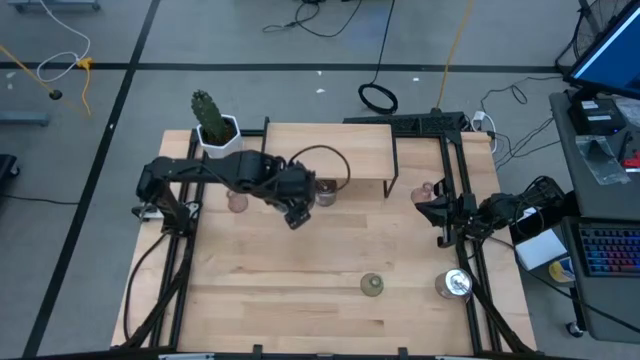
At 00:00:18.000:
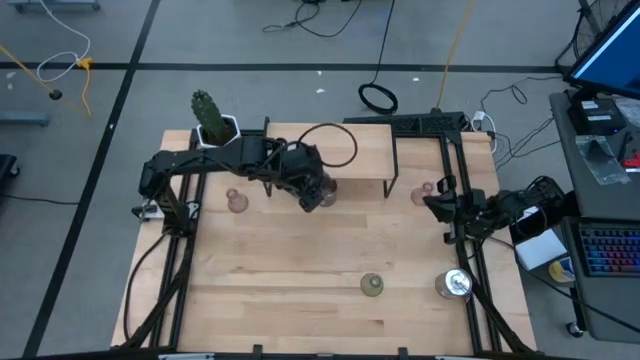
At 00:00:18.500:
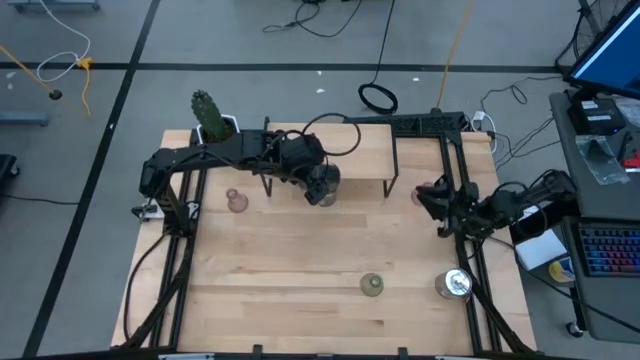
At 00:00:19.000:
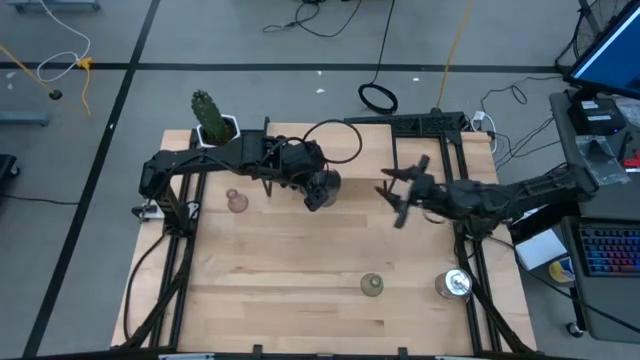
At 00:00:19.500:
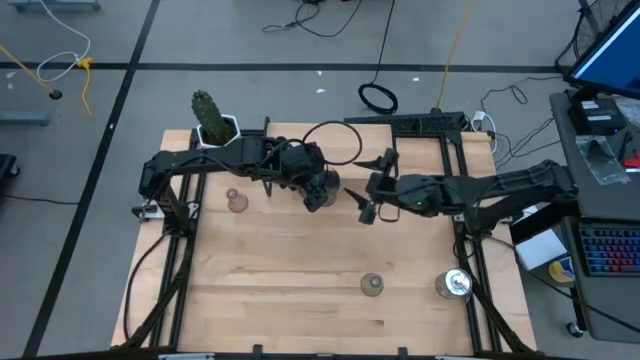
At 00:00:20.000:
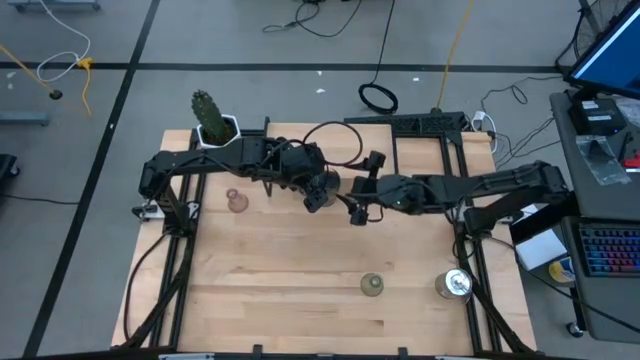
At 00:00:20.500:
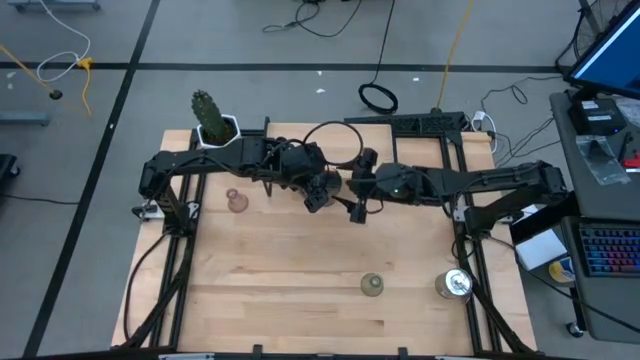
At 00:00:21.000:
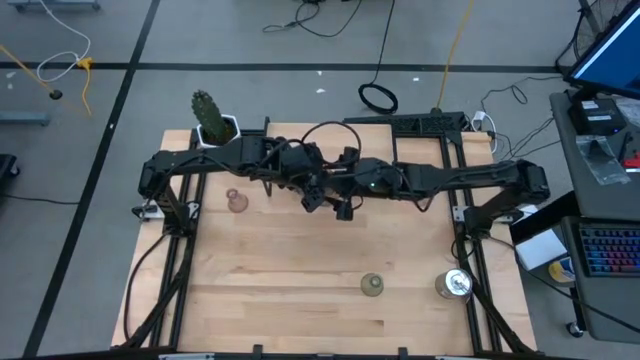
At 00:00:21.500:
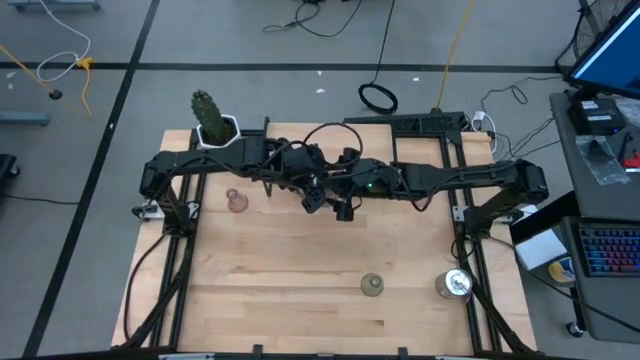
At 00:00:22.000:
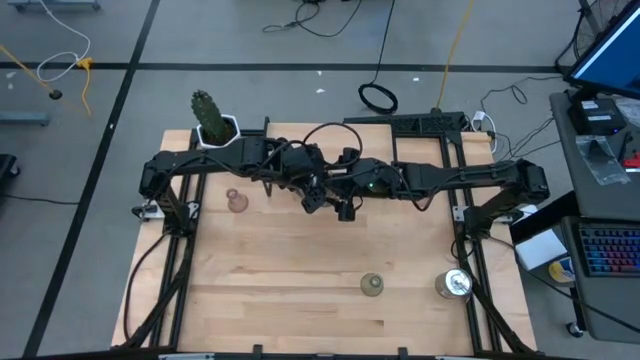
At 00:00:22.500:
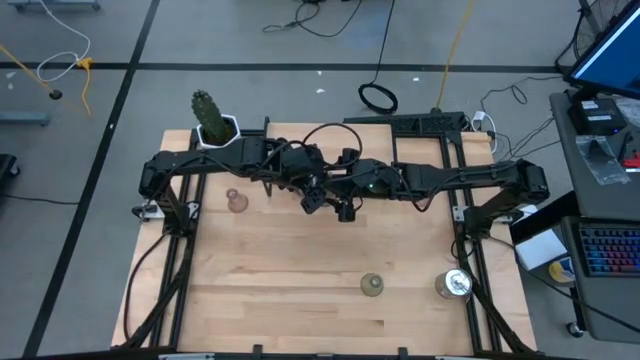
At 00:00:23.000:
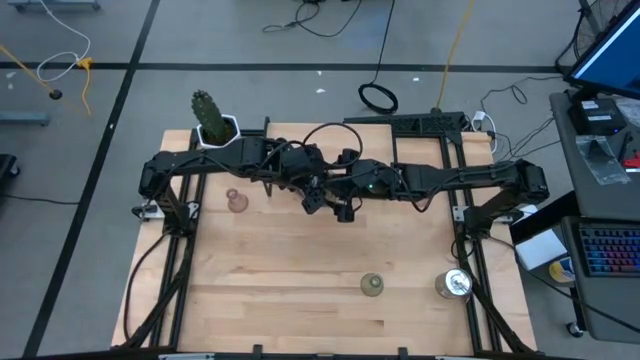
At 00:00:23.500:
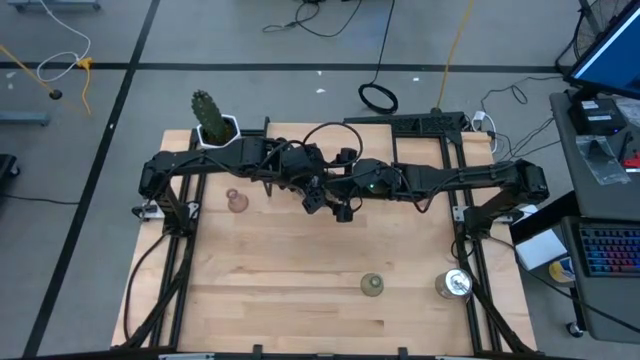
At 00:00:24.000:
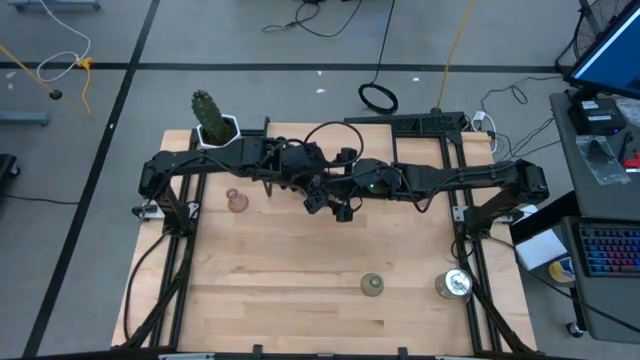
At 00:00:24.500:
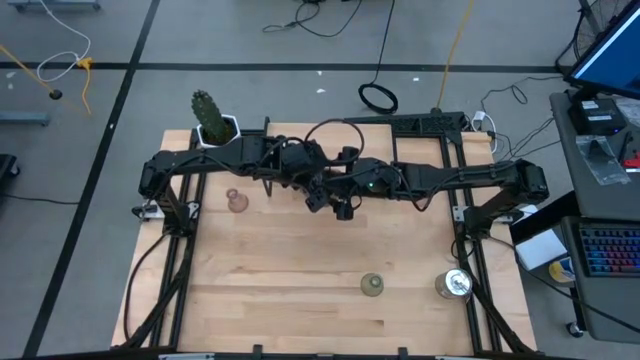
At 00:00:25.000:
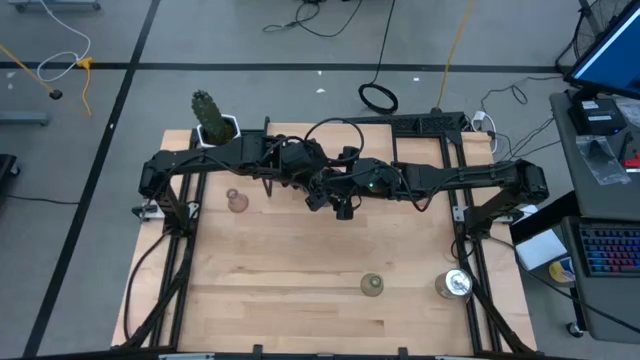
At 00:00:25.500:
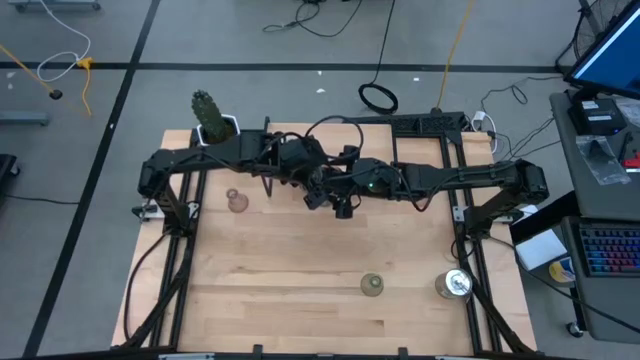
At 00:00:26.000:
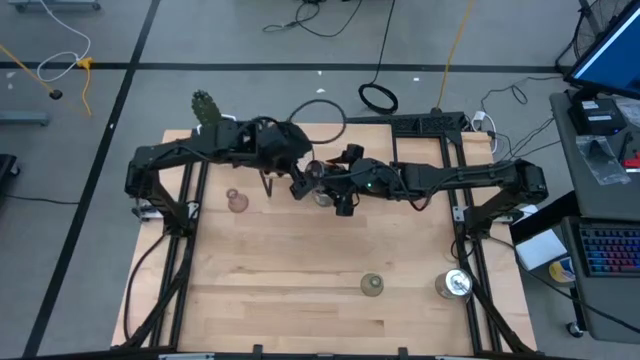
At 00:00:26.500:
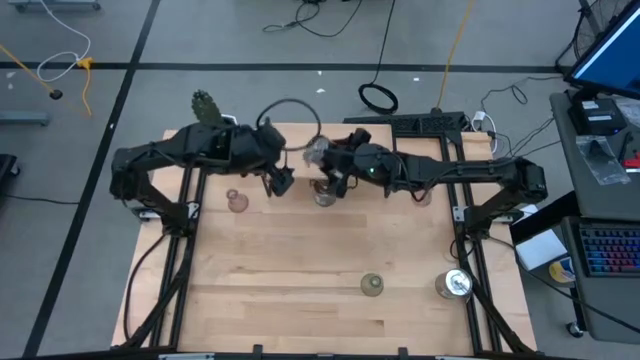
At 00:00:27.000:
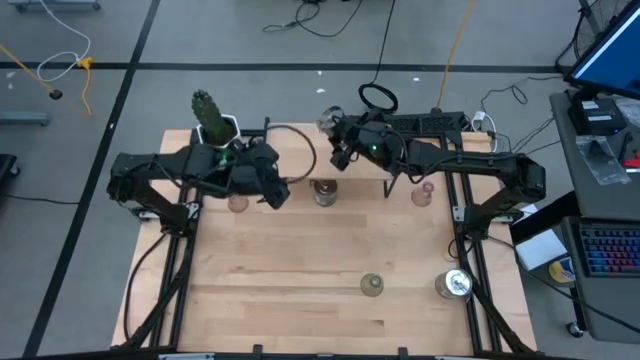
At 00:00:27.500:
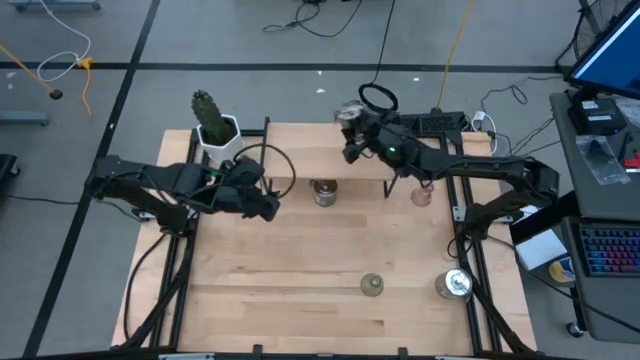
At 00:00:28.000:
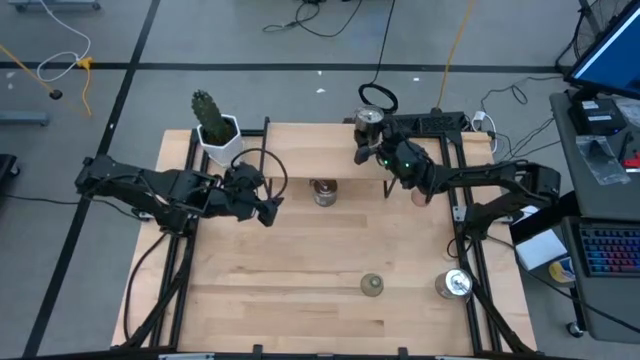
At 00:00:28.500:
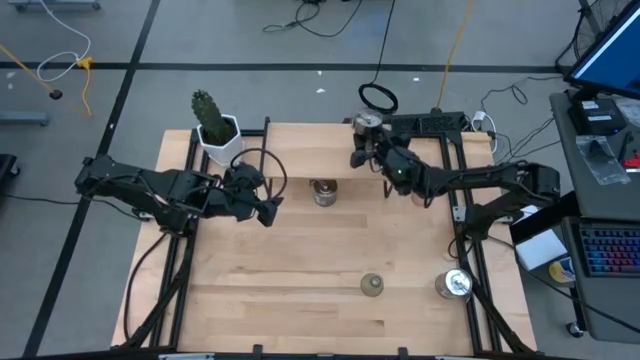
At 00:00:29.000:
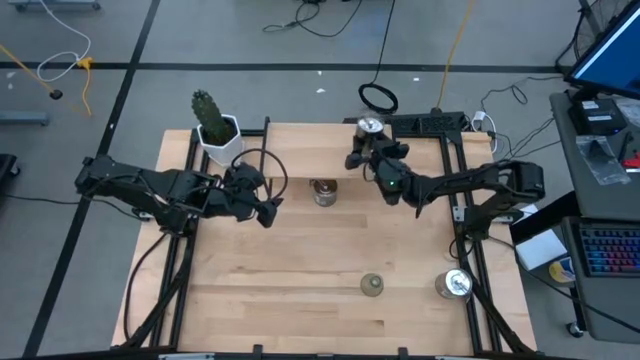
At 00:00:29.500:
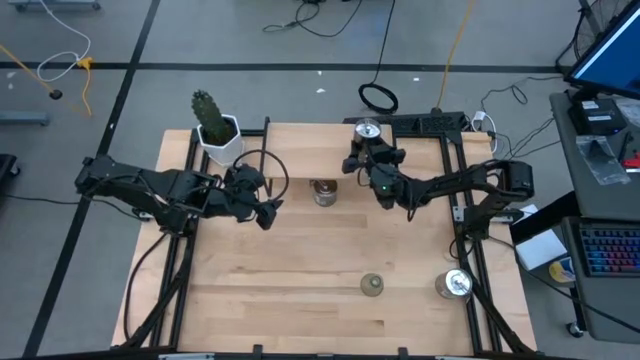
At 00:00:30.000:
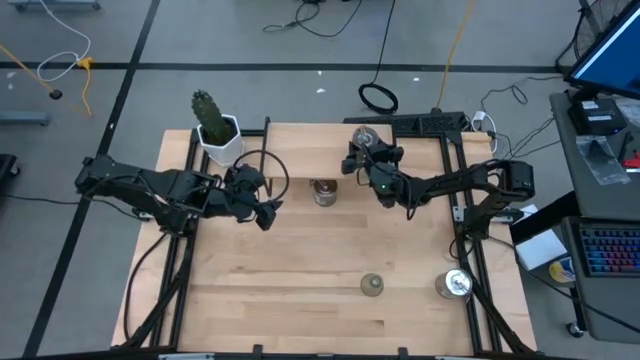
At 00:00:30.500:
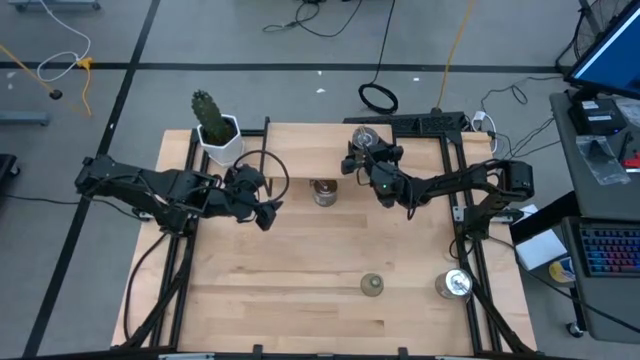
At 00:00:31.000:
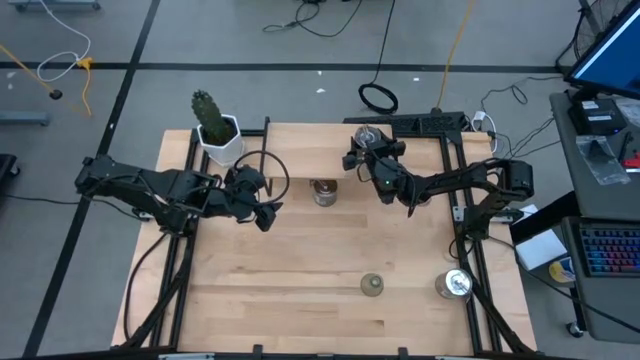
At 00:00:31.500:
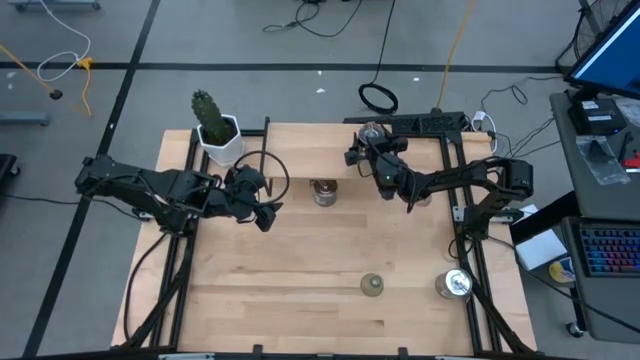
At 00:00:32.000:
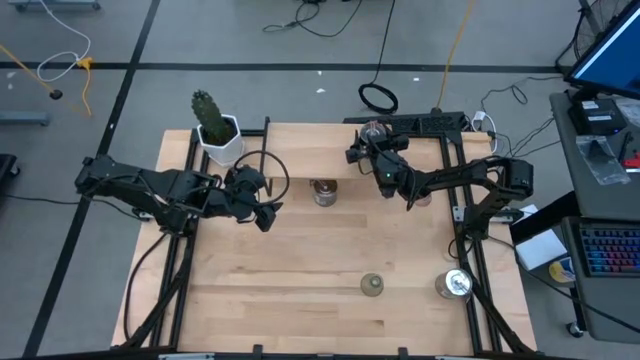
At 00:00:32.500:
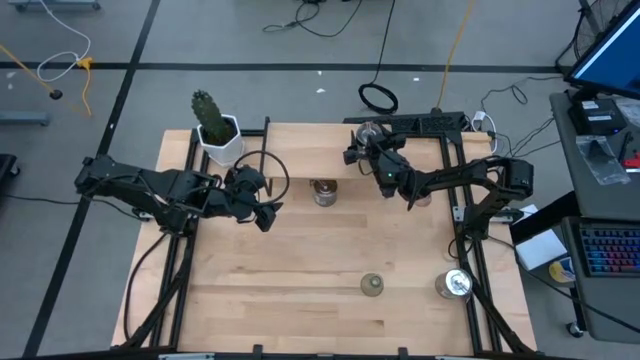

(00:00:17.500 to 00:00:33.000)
Task: Pick & Place candle stick holders
Put the orange scented candle on the shelf

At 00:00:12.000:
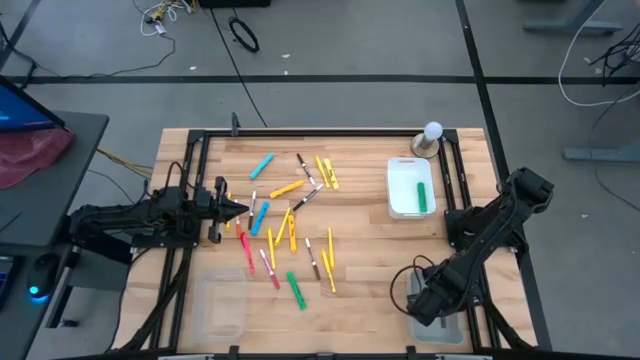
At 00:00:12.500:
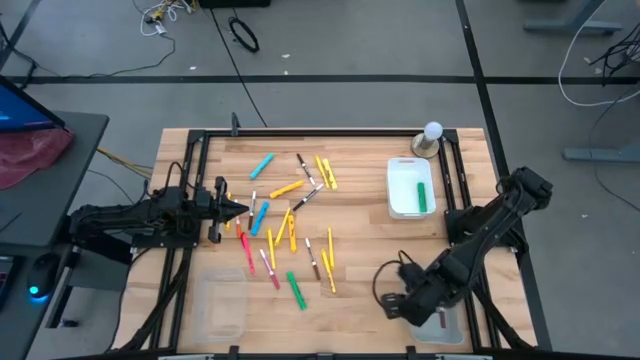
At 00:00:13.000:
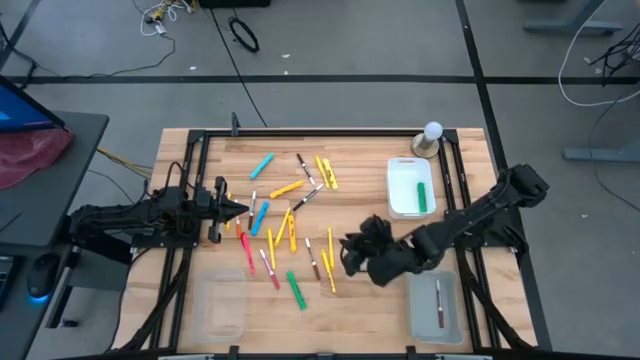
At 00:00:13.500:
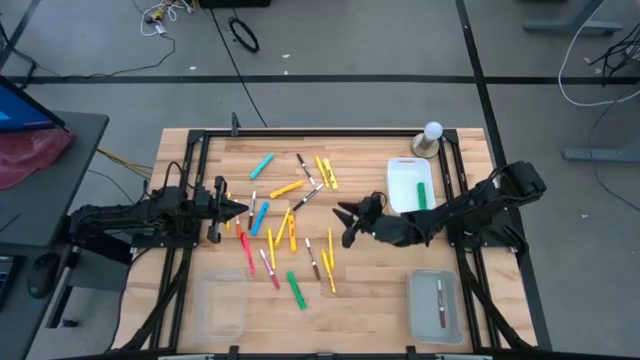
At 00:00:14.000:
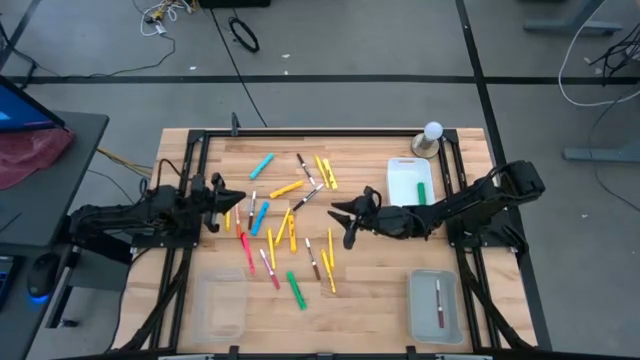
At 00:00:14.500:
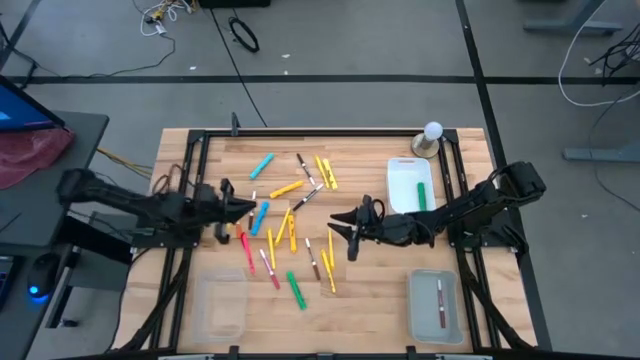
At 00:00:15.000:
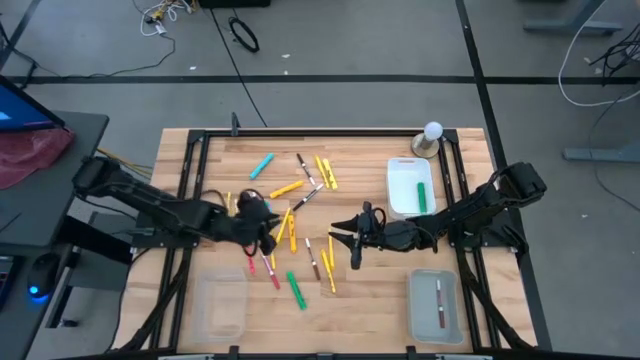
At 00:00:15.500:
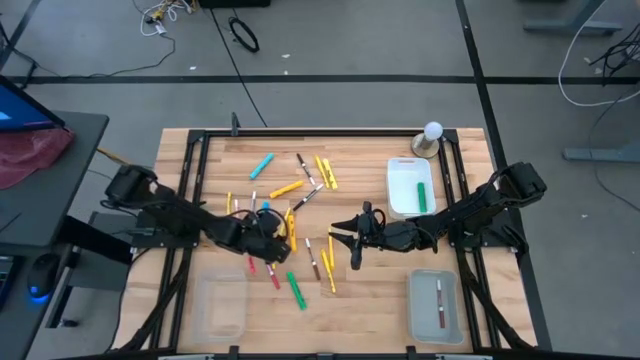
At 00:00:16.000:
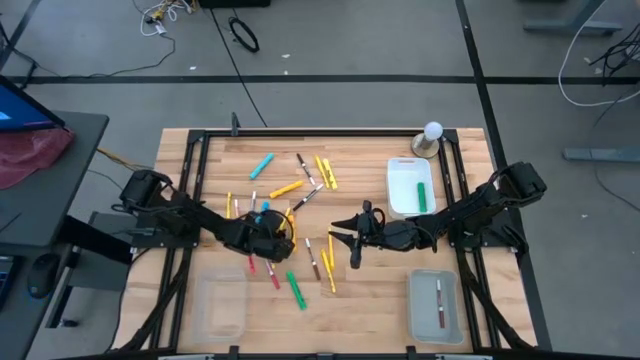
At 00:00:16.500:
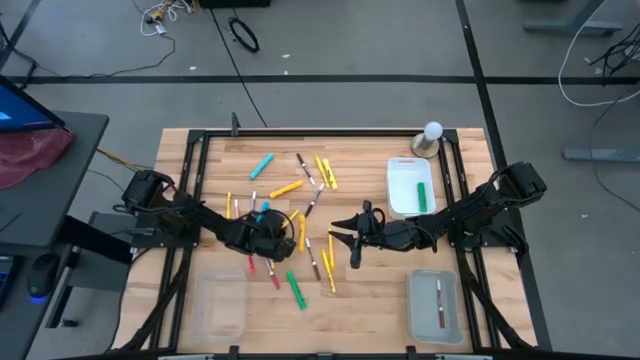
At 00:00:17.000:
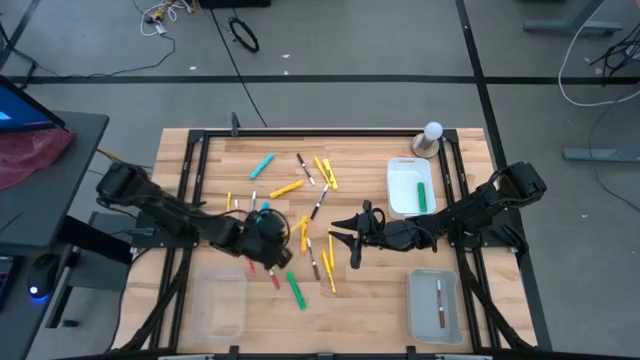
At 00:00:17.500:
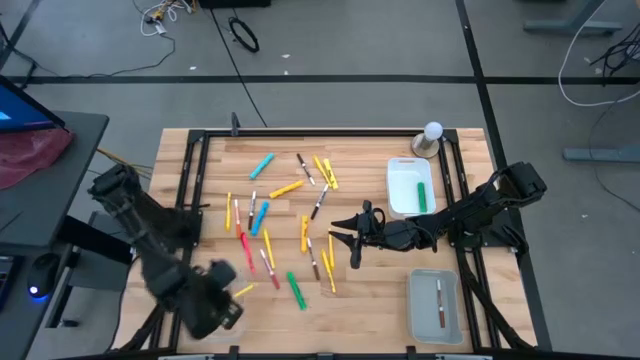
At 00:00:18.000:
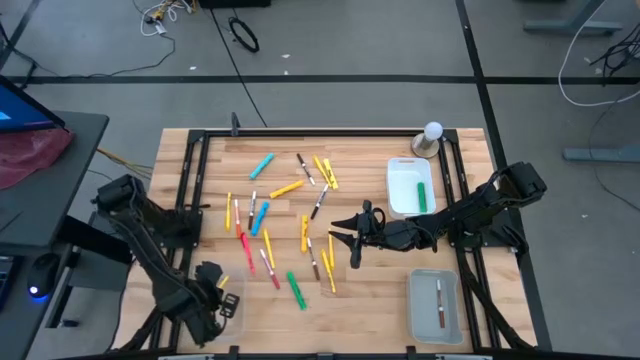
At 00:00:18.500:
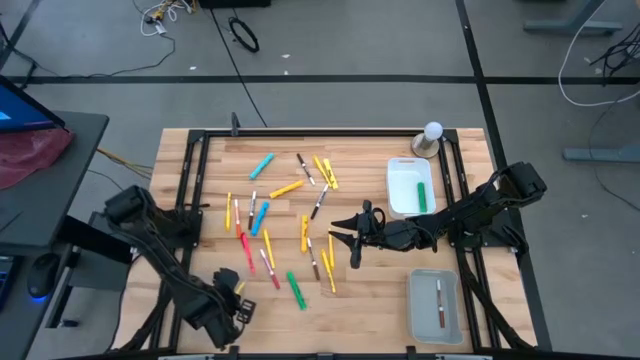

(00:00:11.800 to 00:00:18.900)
Task: Pick & Place Markers
Put the yellow pen into the transparent bin
